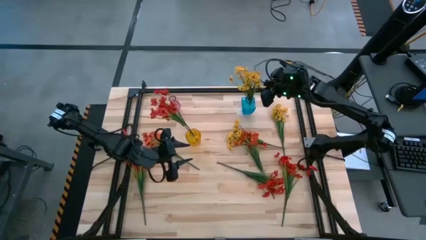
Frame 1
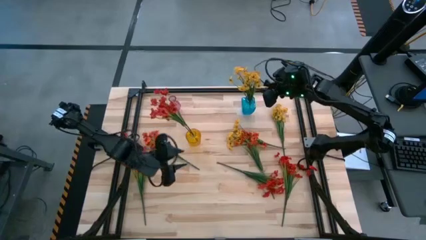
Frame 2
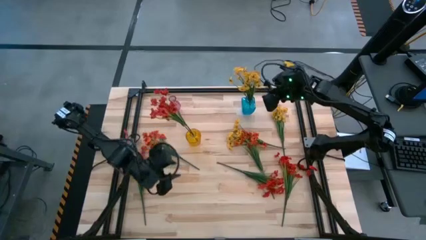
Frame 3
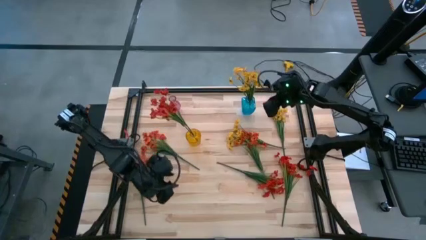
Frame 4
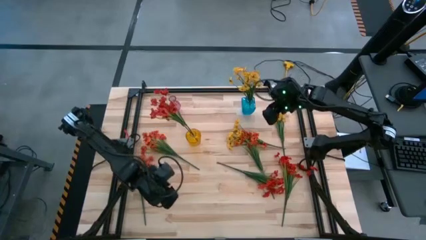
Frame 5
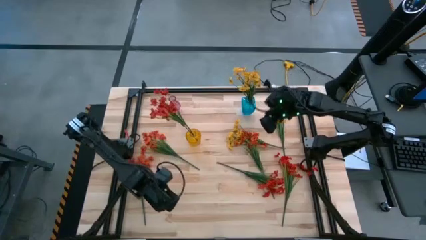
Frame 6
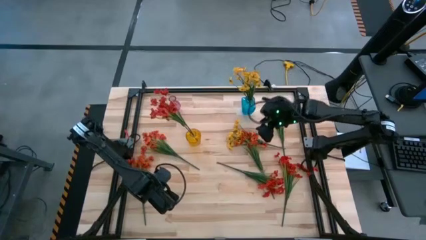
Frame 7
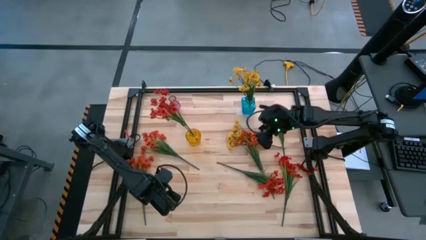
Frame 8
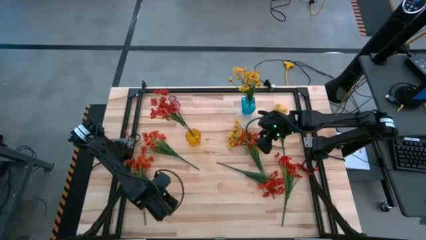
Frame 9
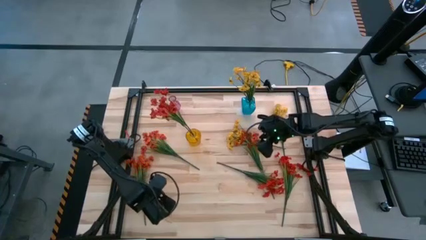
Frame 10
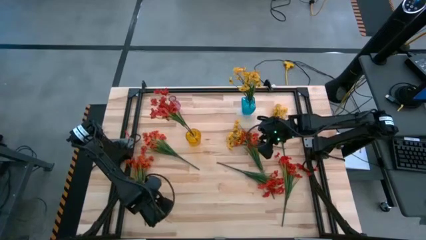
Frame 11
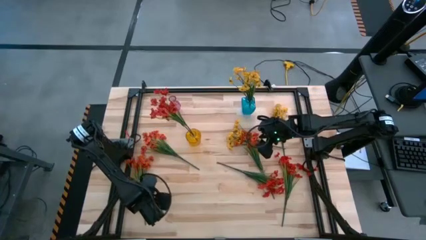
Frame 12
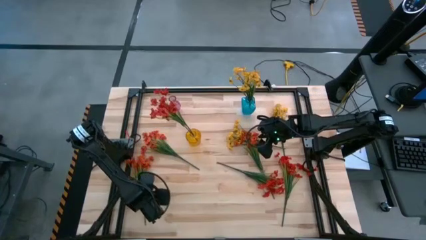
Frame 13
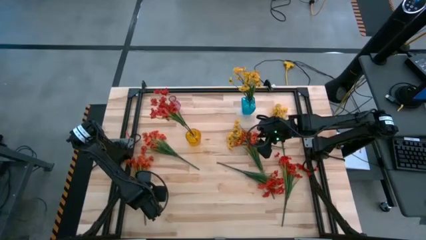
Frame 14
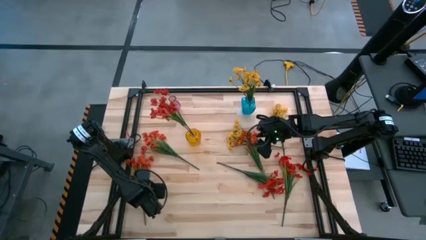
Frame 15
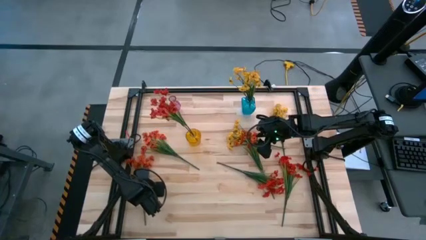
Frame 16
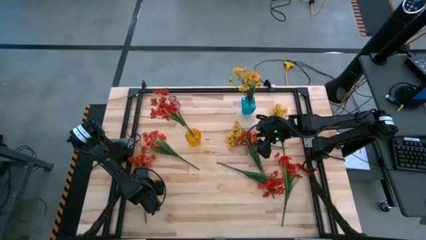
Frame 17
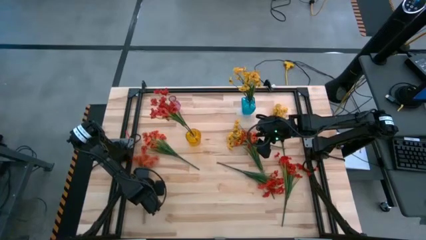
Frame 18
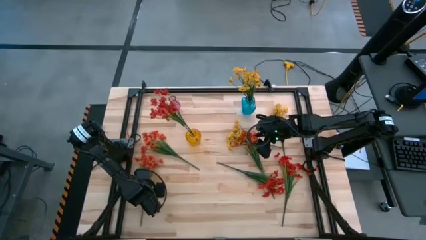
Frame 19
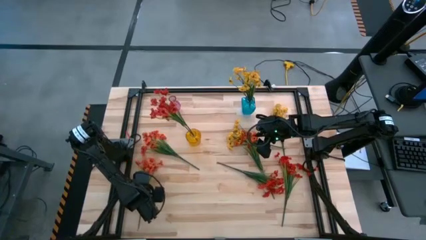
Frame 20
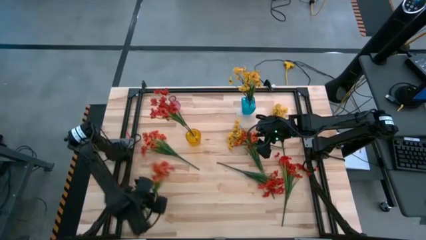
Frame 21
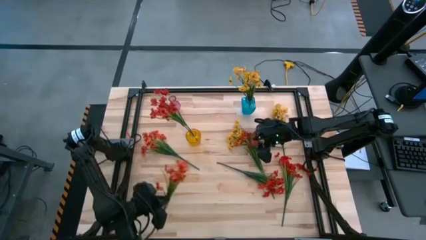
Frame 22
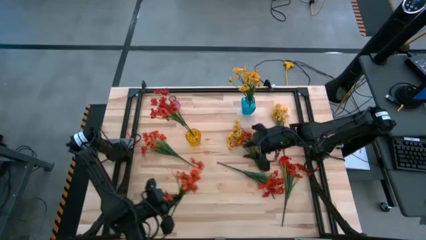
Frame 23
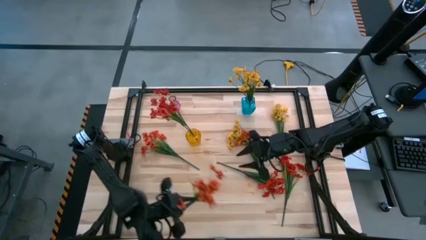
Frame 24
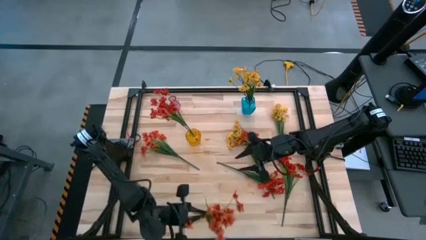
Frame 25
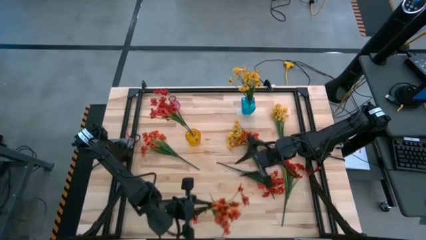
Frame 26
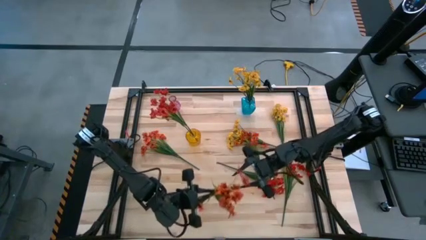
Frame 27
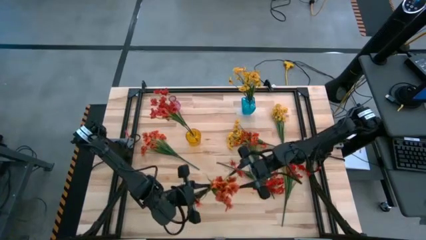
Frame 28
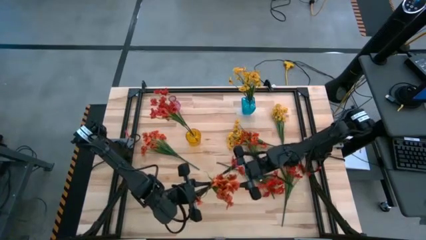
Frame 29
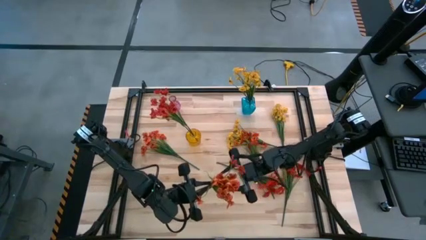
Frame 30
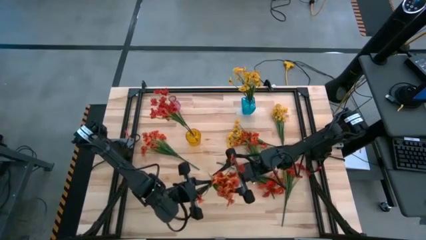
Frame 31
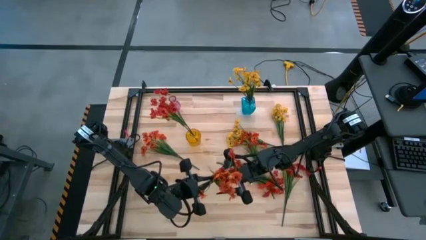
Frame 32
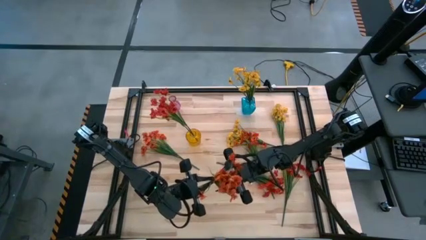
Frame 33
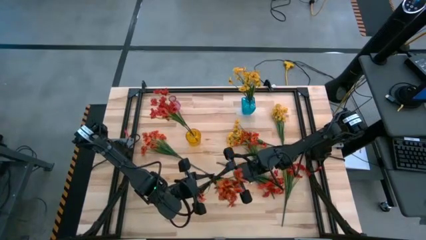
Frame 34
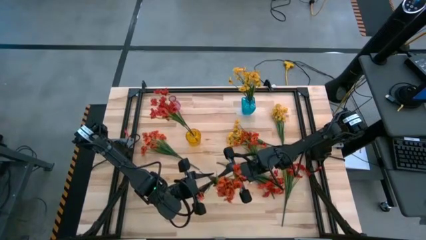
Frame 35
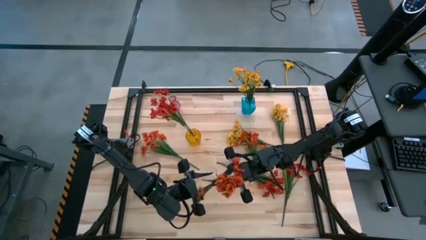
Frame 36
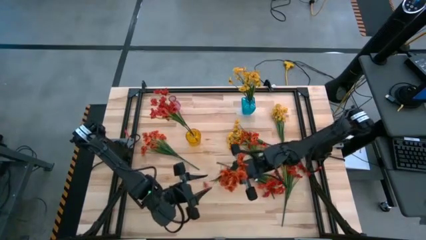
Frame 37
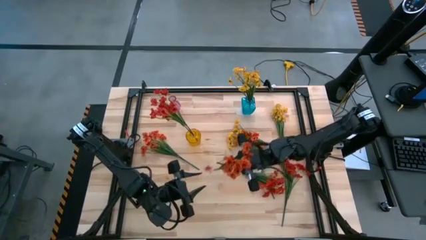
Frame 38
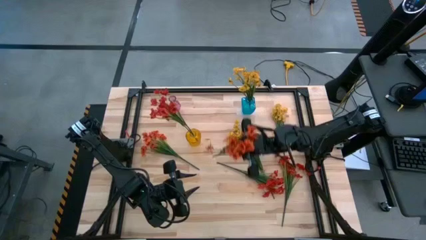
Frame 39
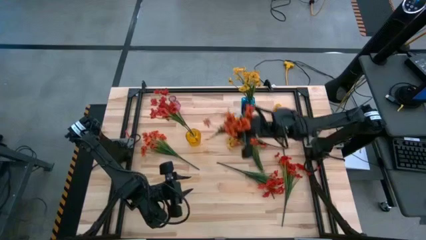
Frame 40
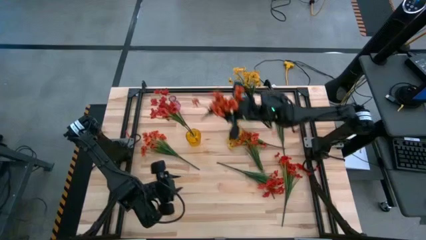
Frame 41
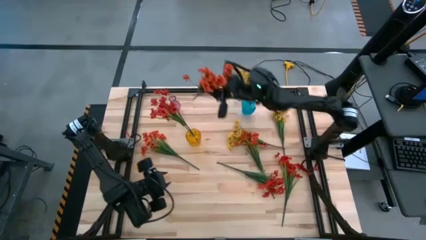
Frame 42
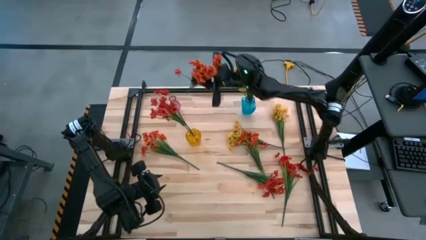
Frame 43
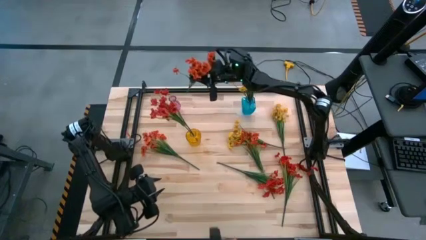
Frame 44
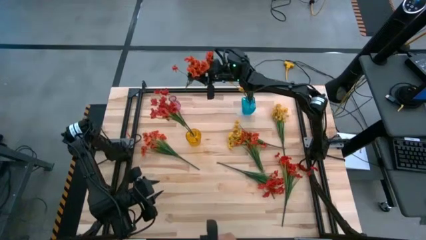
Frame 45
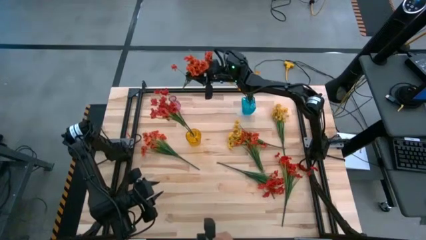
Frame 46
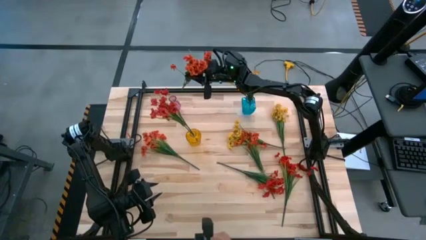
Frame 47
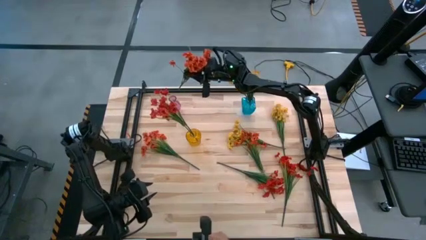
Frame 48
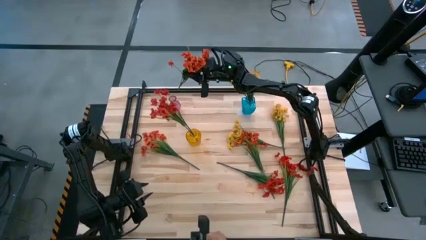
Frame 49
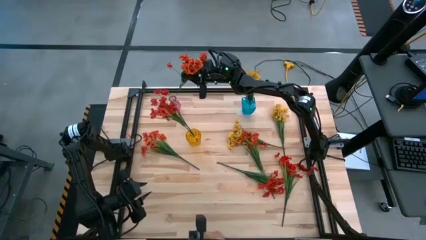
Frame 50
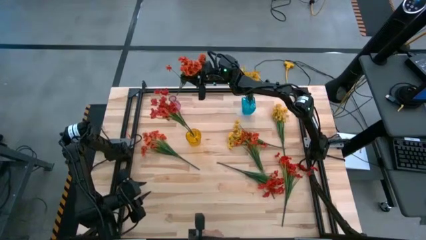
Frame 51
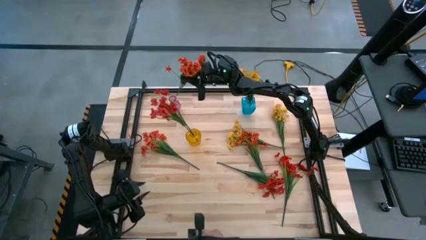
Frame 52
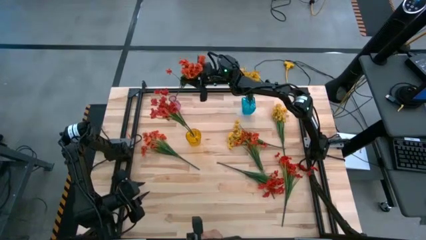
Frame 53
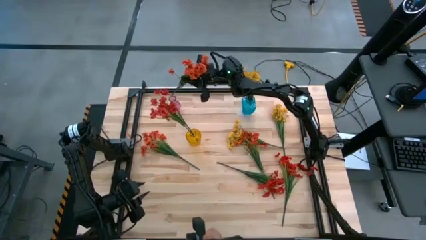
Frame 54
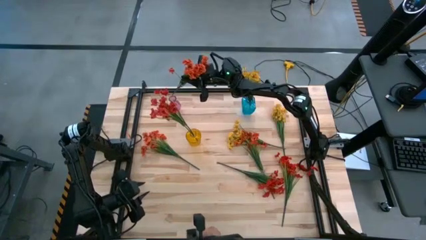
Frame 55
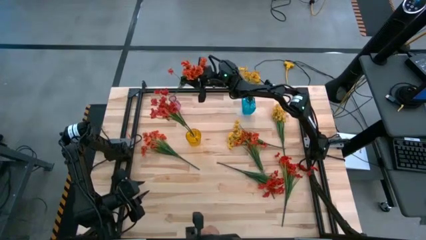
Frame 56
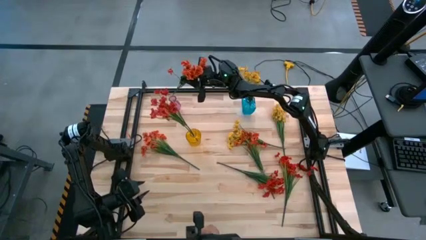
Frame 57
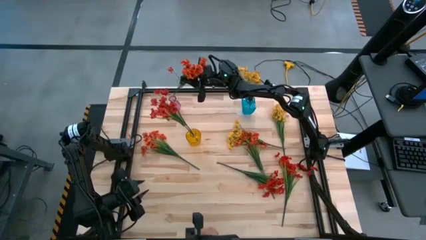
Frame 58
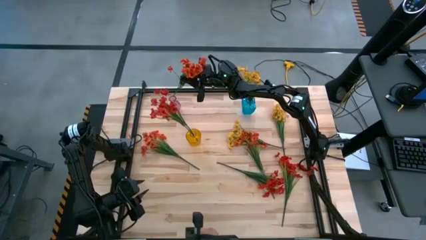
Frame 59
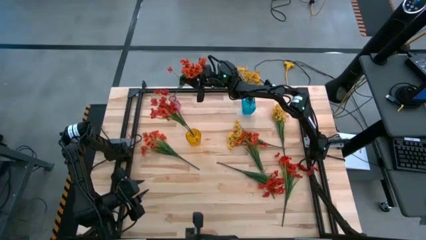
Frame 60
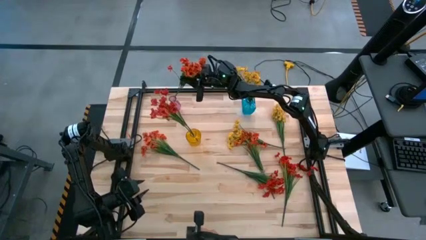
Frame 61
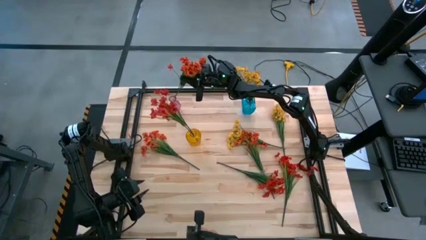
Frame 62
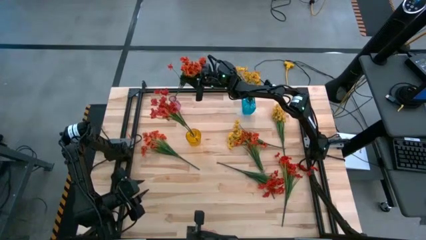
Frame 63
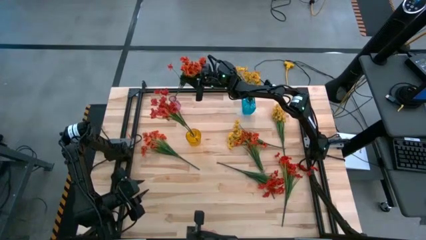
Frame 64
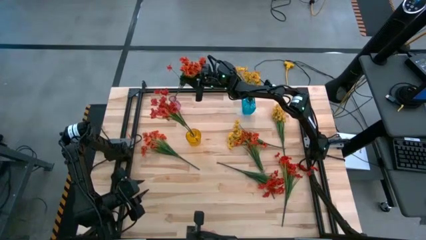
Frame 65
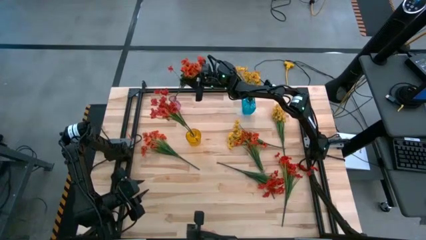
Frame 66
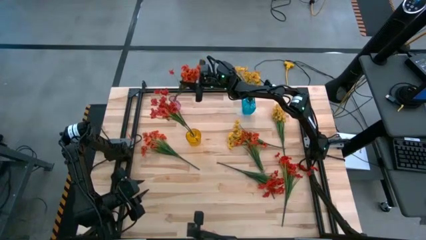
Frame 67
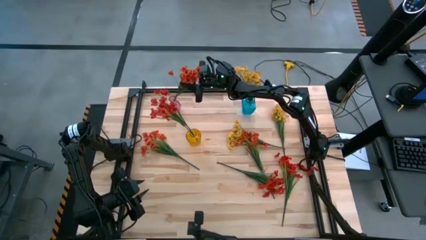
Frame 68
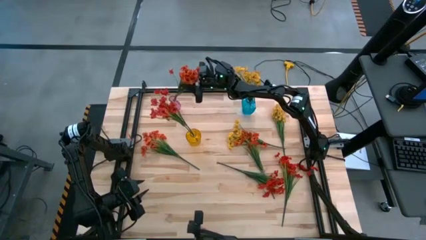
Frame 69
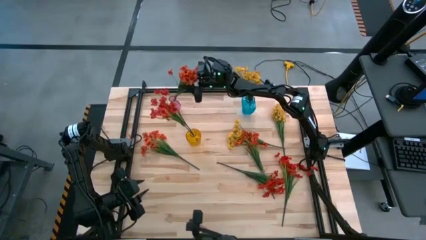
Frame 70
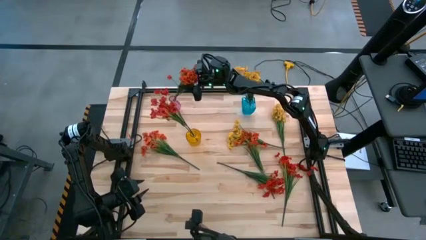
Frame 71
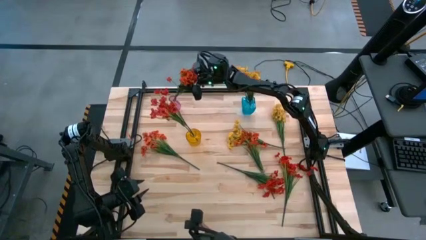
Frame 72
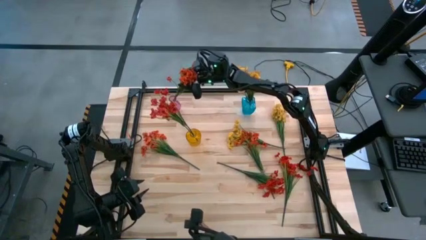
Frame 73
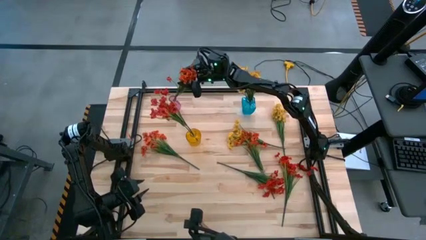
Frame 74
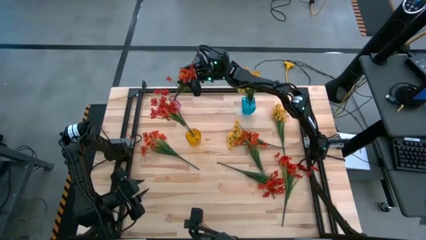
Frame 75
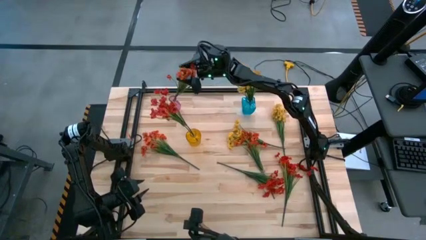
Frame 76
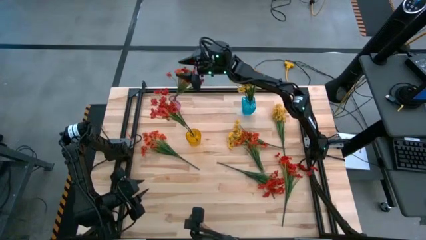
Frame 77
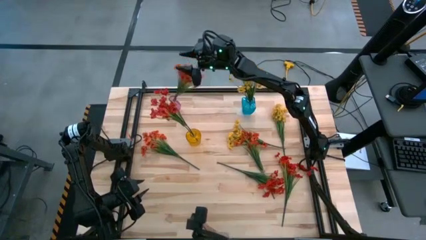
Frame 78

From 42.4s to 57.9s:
Task: Sort flowers into vase by color
Put the middle orange flower into the pink vase
